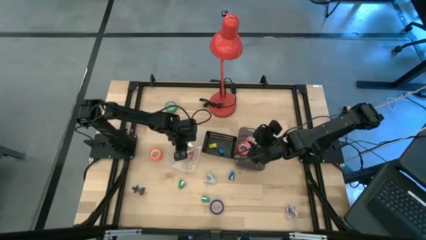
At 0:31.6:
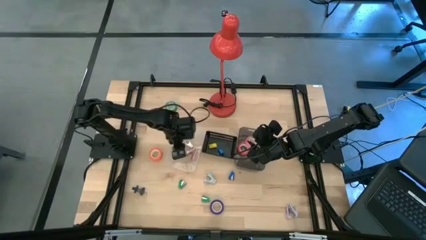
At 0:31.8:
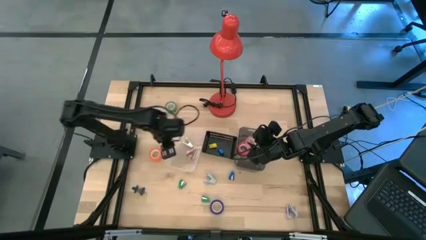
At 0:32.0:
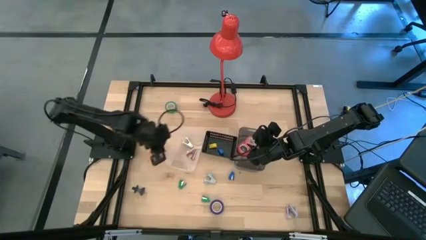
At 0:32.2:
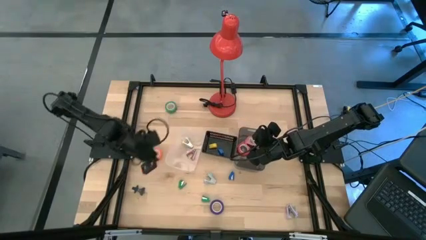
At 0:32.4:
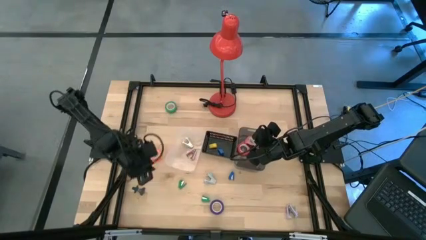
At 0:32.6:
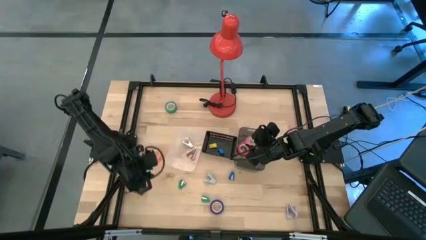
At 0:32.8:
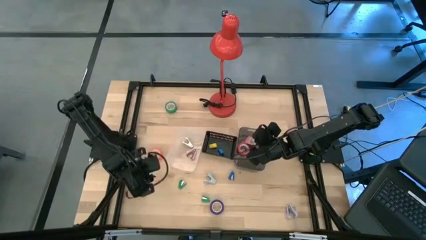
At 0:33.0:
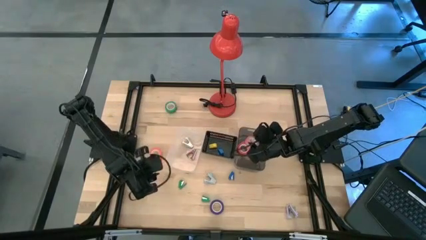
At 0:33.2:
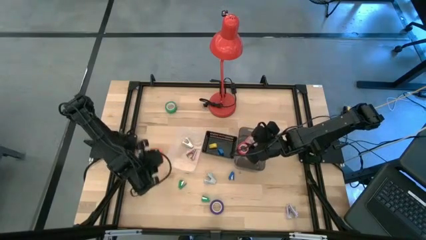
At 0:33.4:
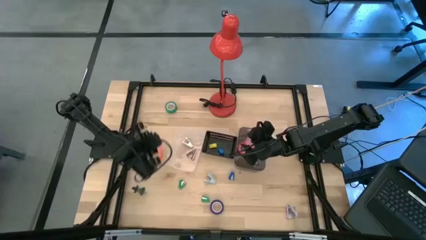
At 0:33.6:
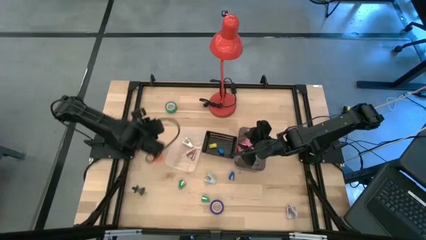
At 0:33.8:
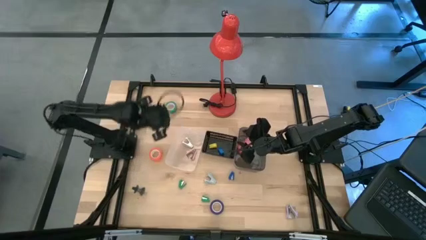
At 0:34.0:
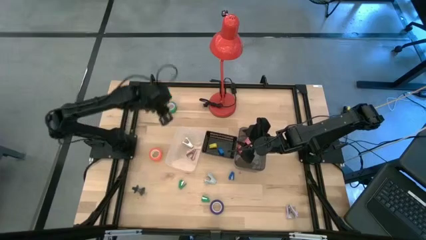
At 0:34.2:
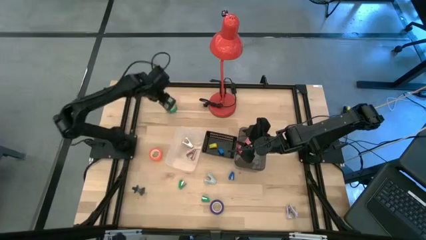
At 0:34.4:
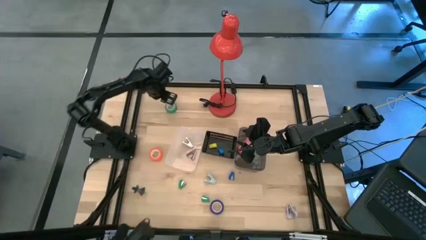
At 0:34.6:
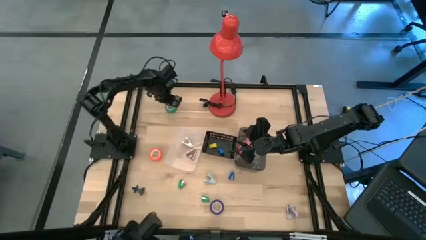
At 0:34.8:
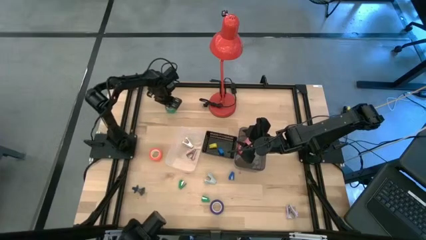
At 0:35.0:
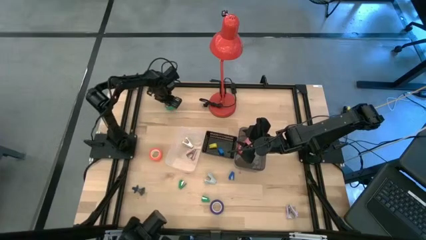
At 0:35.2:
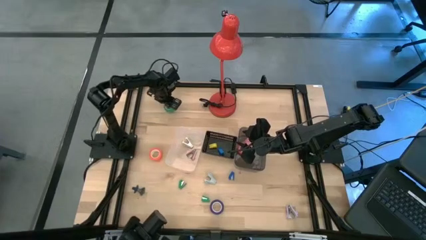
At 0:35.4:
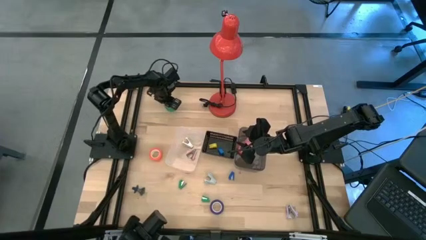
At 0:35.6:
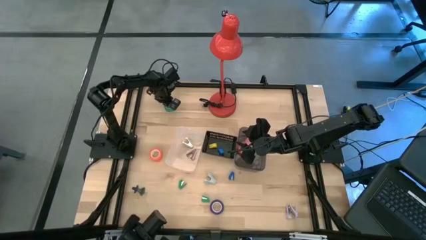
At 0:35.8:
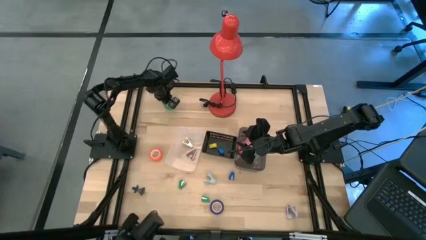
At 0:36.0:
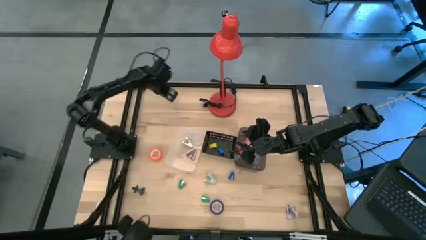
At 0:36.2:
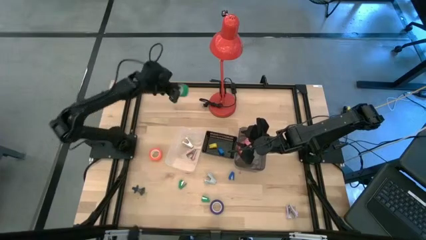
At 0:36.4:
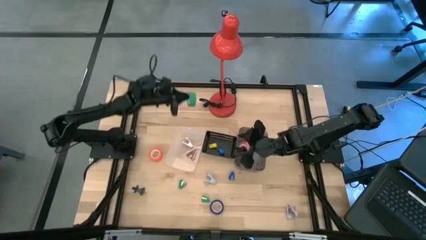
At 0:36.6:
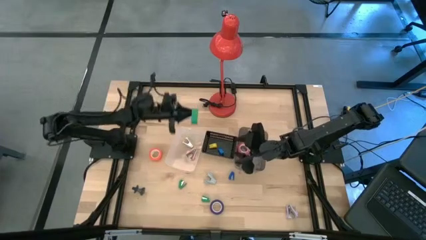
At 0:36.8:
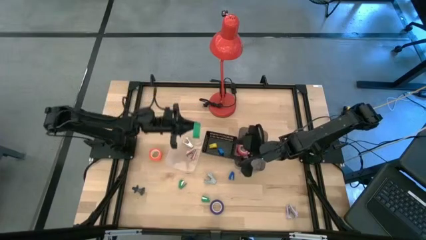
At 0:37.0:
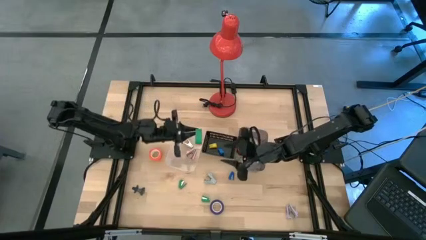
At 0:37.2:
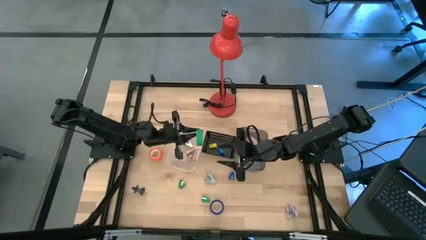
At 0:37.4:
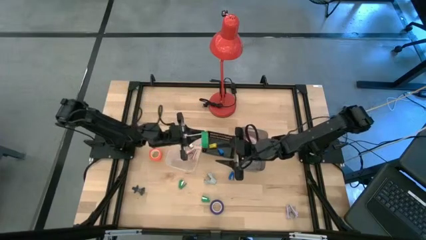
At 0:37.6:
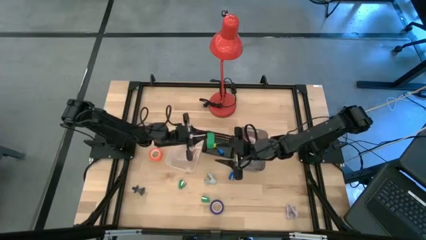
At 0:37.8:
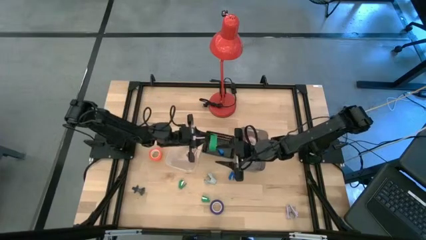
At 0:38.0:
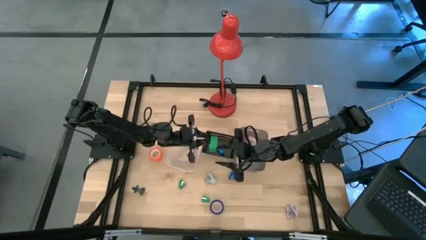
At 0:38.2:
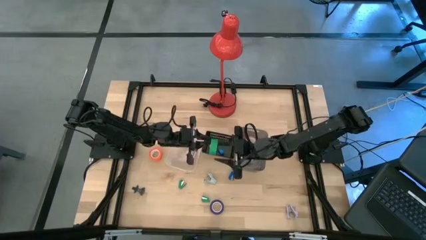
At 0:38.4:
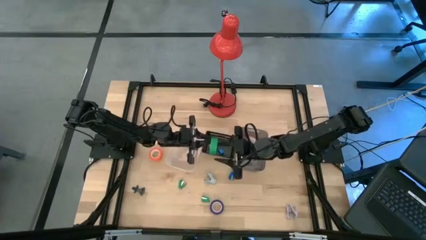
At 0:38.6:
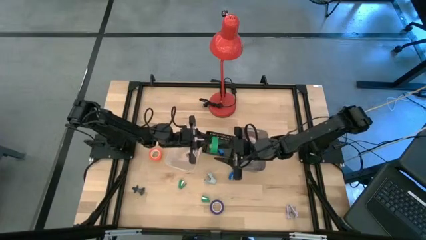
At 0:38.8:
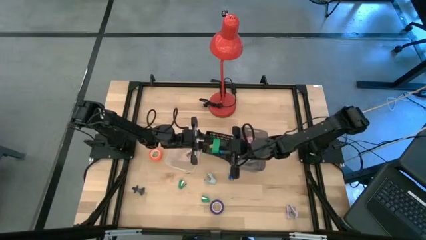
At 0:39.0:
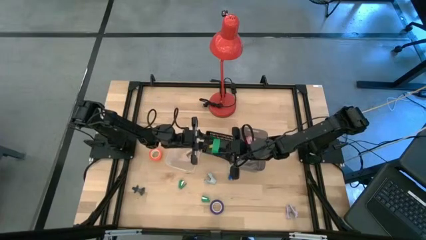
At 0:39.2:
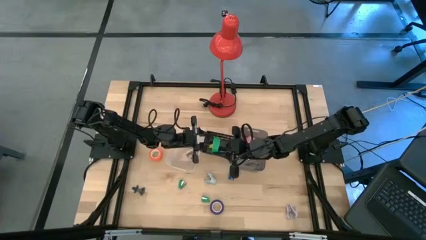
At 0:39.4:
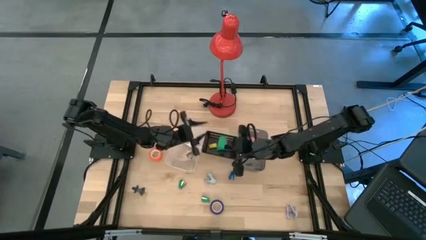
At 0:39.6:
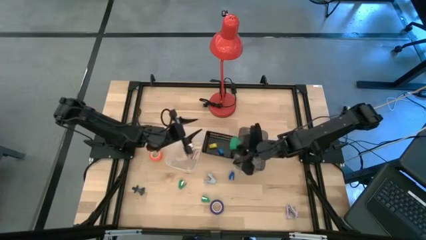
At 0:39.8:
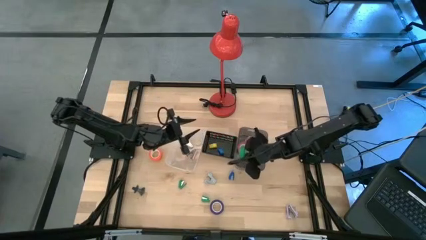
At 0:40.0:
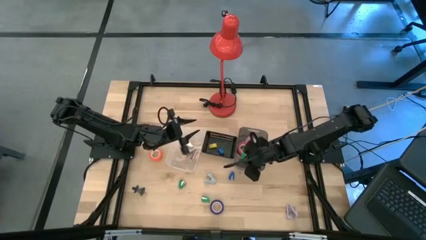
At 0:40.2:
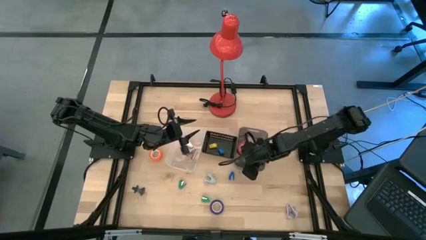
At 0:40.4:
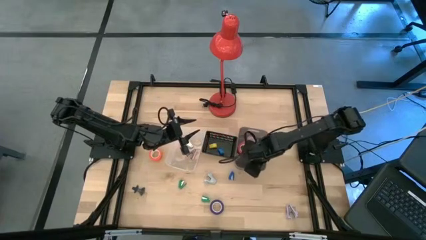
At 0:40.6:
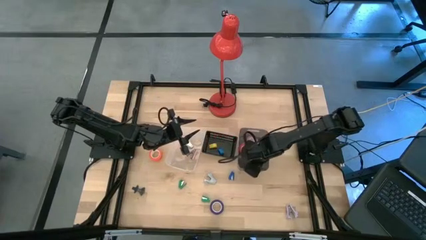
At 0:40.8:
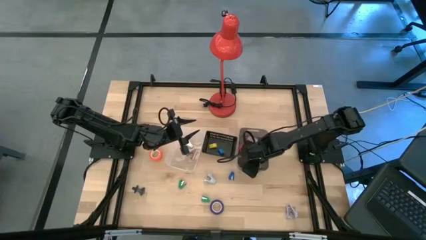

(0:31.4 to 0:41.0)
Task: Pick and place Stapler, Stapler remover, tape
Put the green tape into the black bin

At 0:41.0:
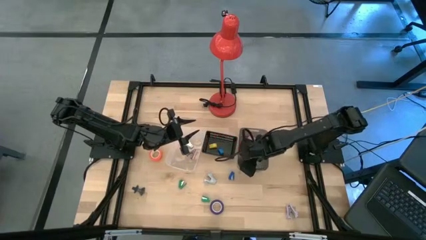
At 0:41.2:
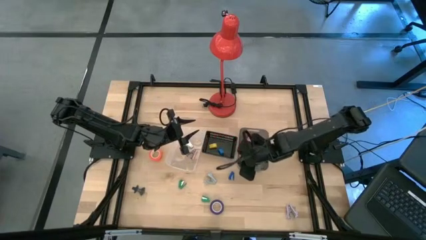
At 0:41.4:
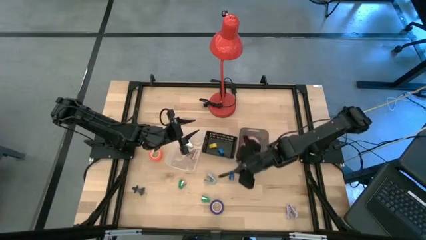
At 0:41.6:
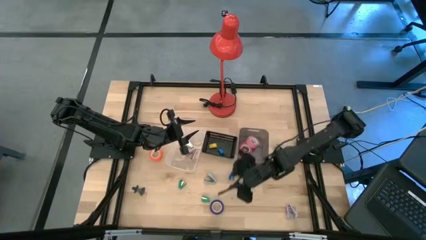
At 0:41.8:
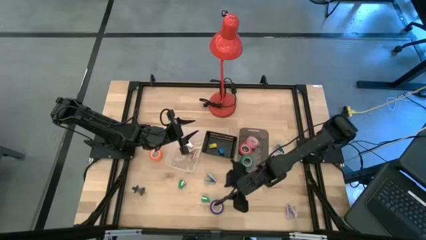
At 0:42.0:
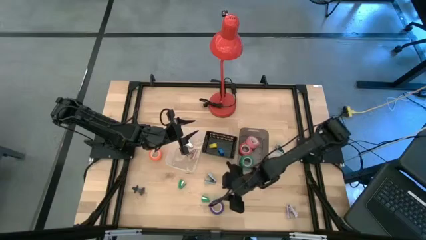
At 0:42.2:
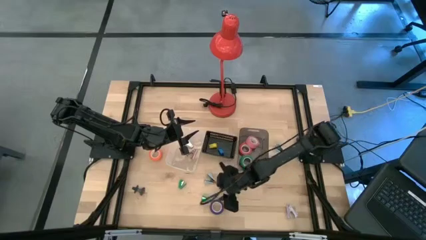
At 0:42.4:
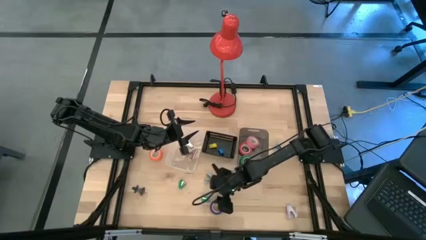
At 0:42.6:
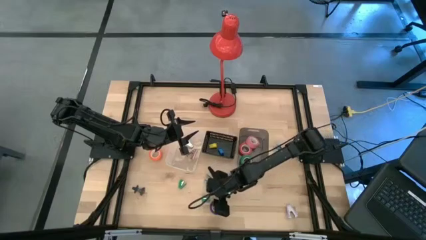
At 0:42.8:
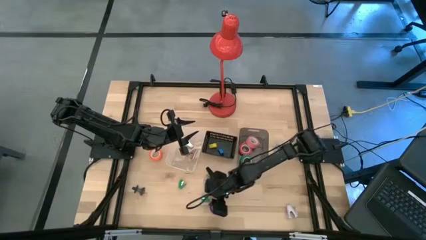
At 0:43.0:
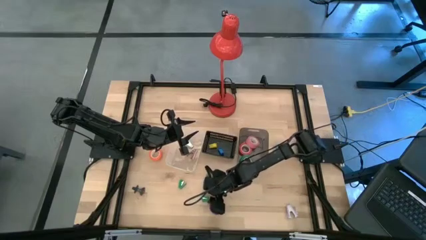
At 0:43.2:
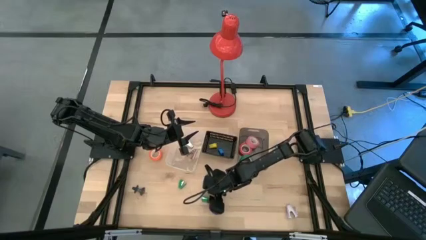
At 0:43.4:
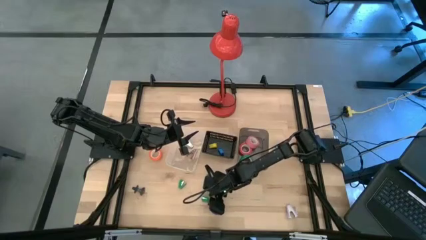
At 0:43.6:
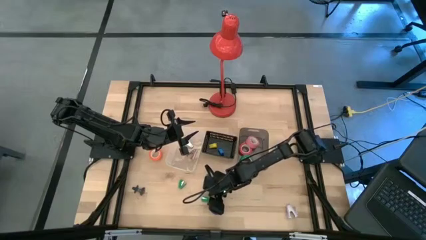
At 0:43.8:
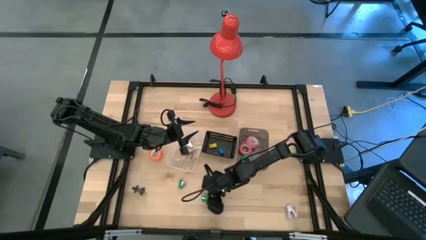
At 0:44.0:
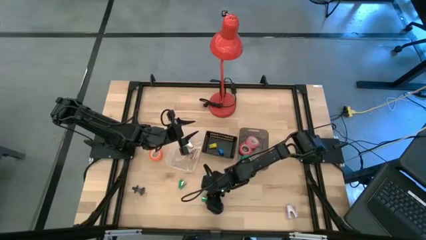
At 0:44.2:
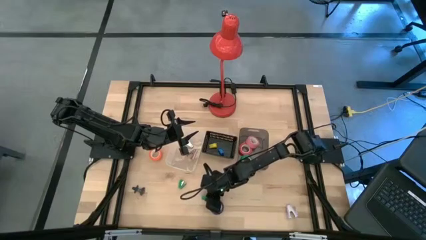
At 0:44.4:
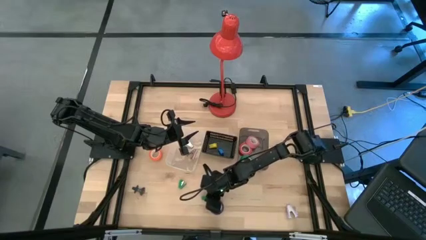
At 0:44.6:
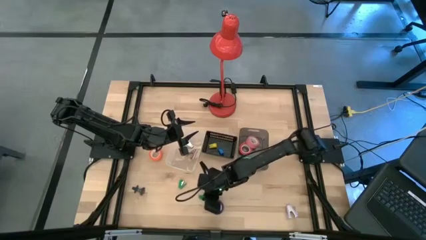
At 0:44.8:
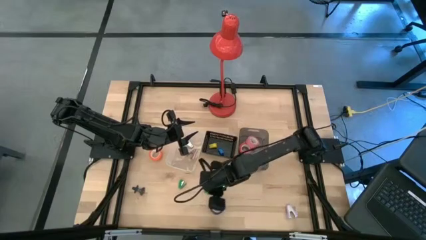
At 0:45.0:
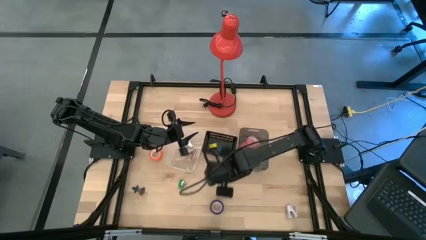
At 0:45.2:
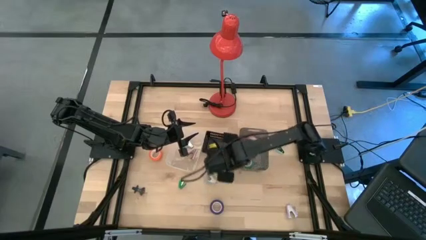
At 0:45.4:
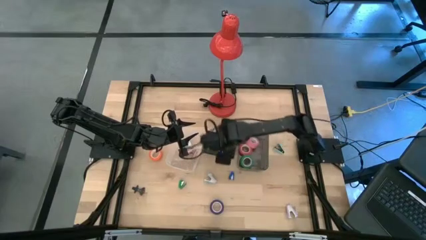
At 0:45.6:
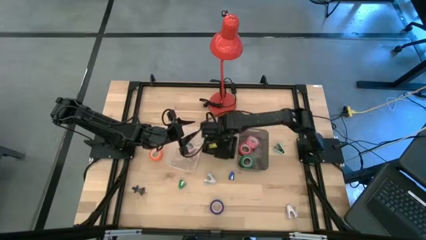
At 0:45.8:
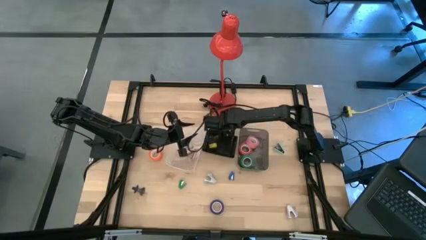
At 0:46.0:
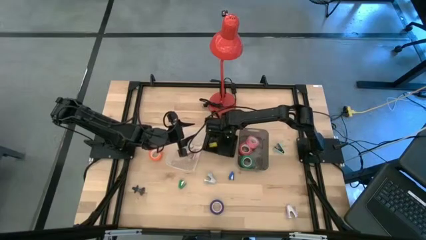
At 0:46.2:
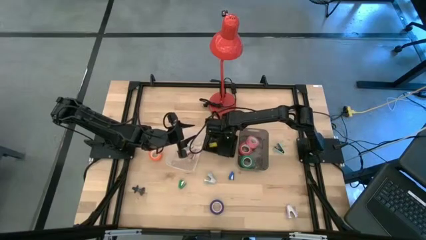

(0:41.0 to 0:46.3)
Put the bottom green stapler into the black basket
